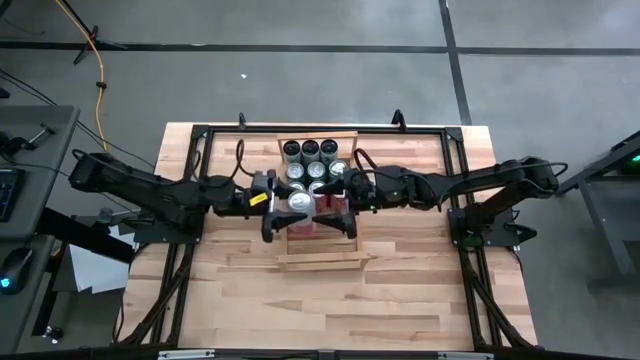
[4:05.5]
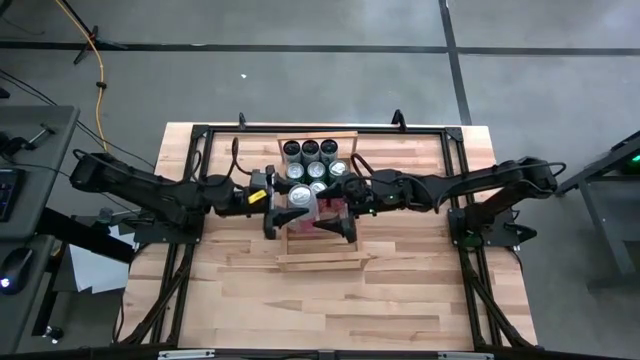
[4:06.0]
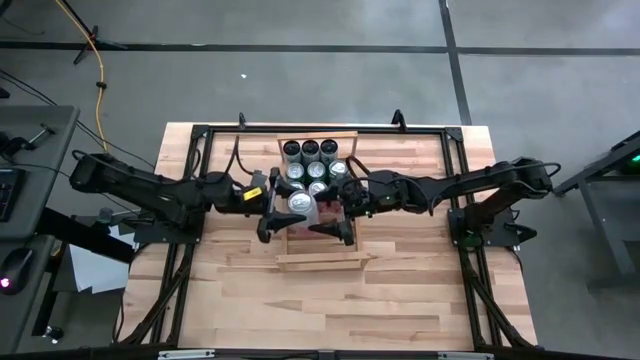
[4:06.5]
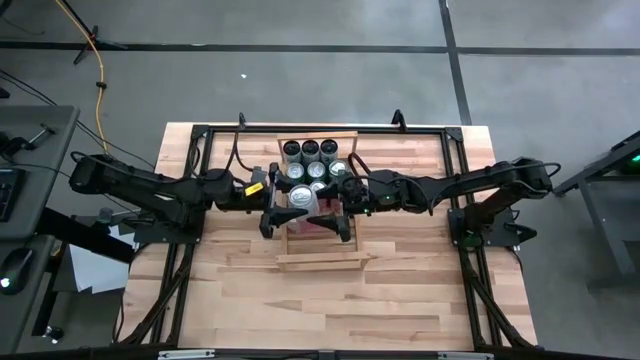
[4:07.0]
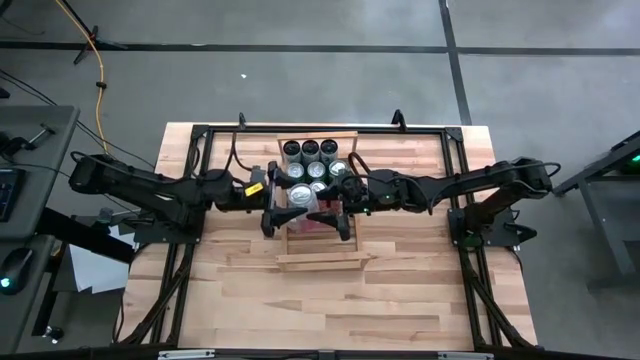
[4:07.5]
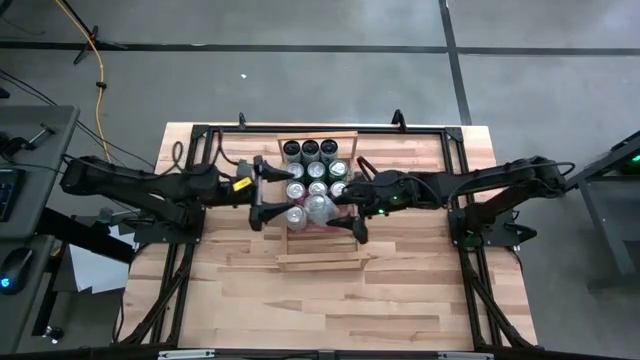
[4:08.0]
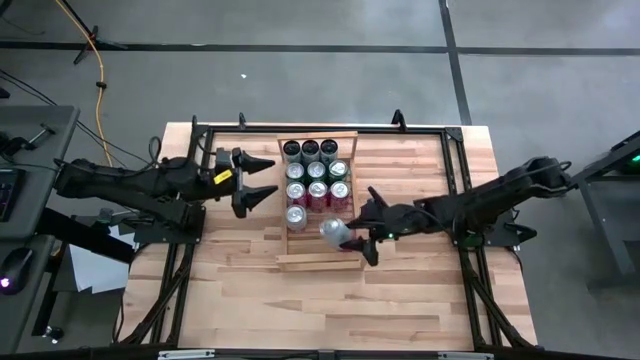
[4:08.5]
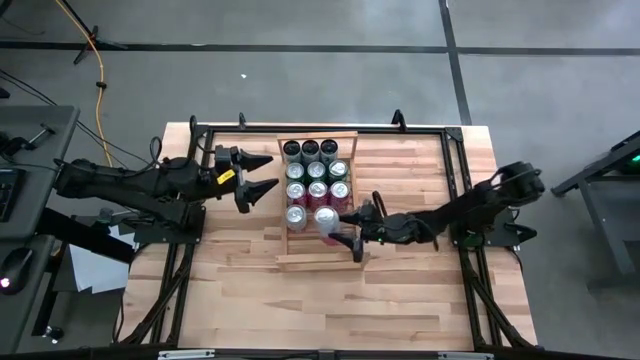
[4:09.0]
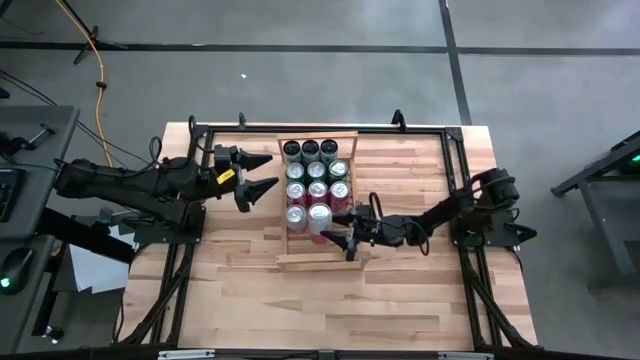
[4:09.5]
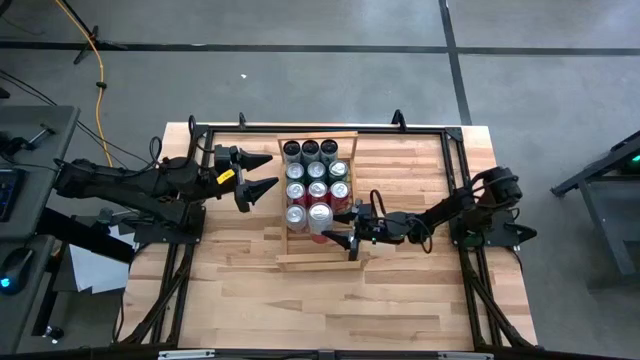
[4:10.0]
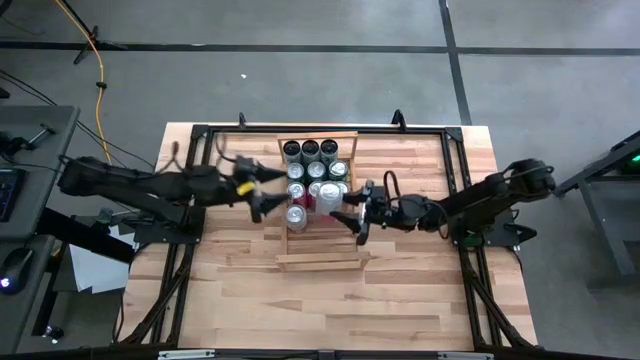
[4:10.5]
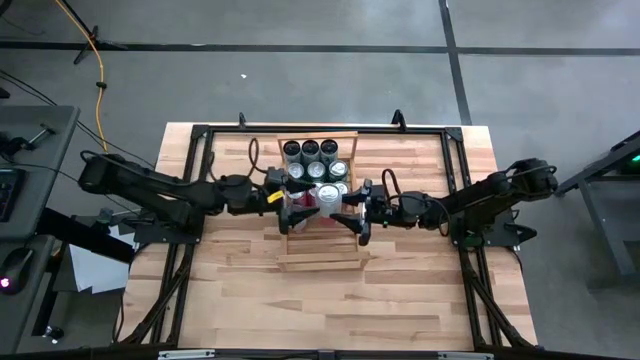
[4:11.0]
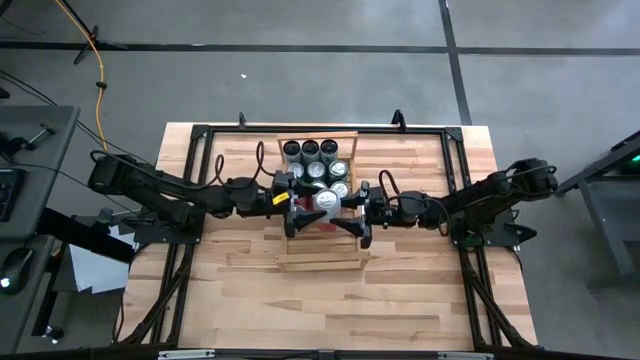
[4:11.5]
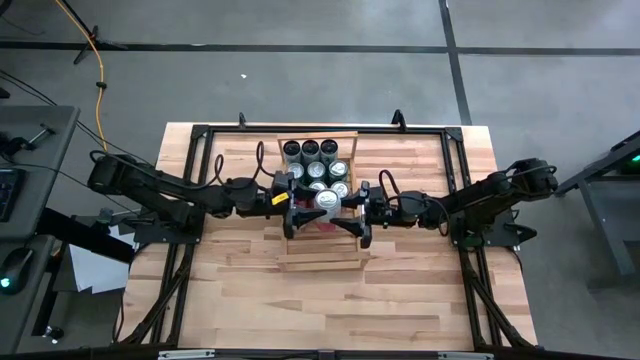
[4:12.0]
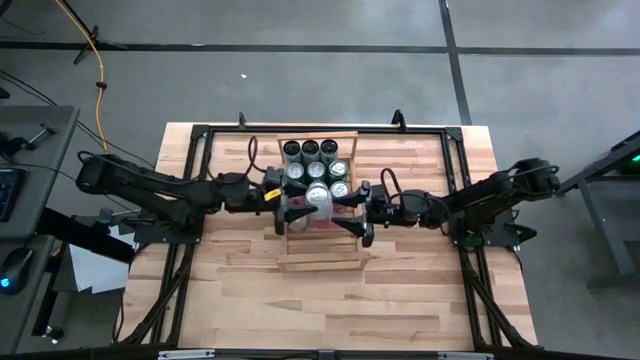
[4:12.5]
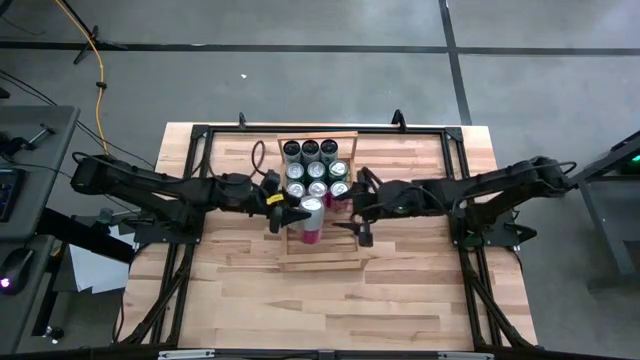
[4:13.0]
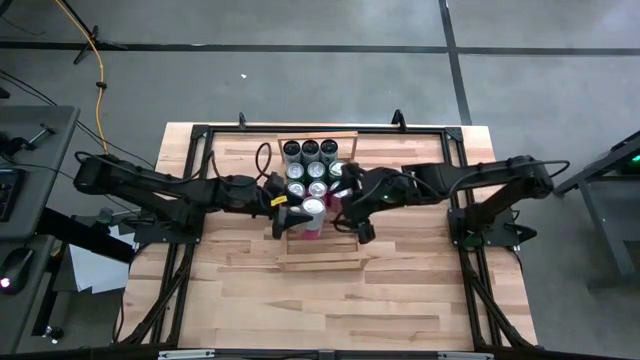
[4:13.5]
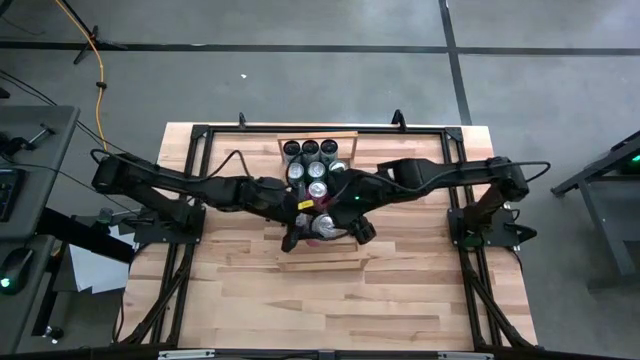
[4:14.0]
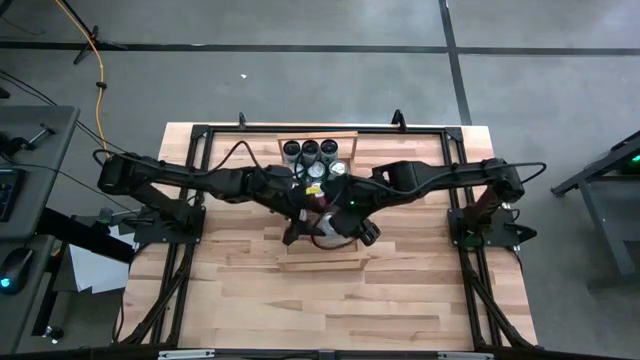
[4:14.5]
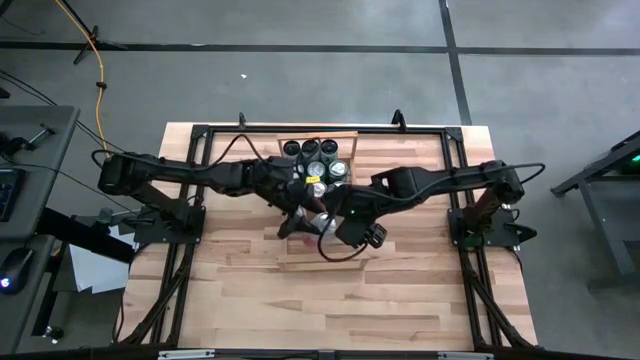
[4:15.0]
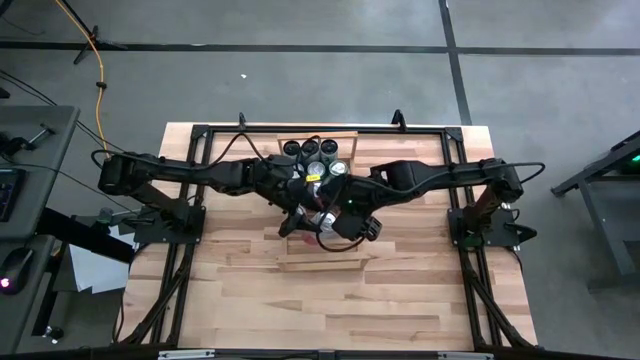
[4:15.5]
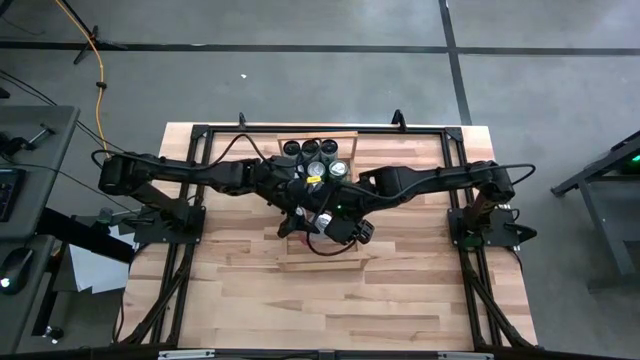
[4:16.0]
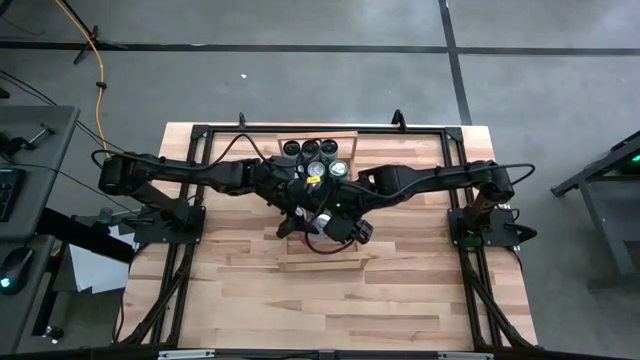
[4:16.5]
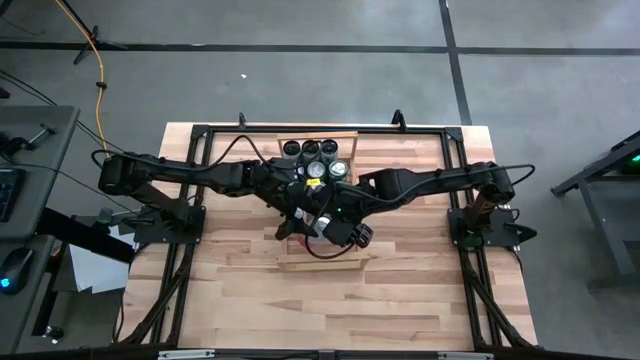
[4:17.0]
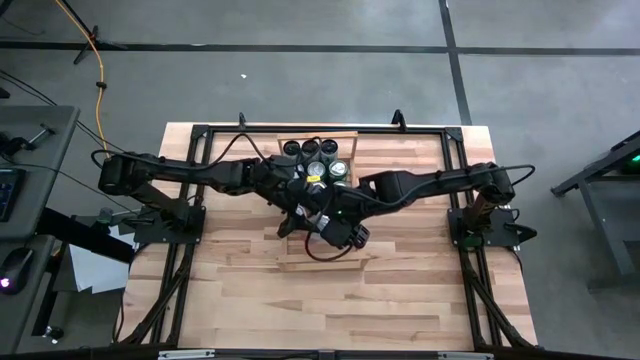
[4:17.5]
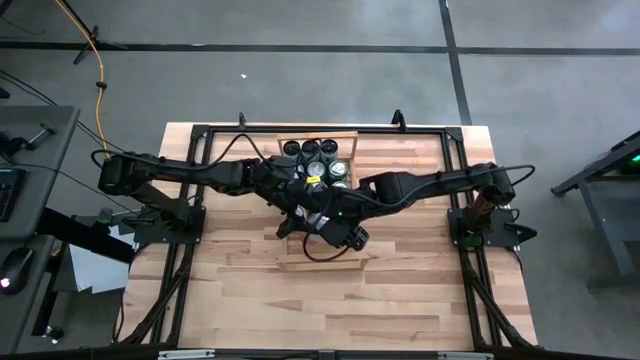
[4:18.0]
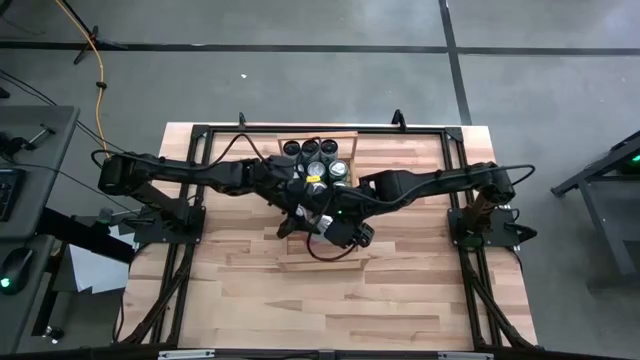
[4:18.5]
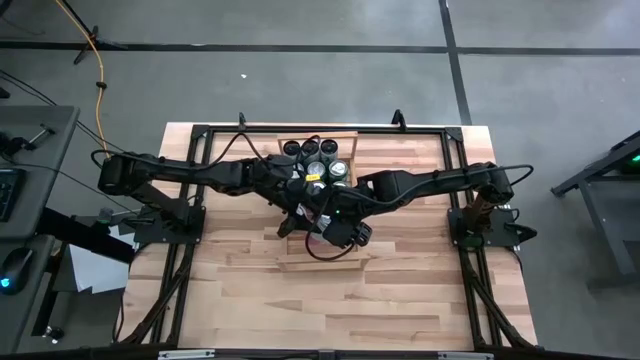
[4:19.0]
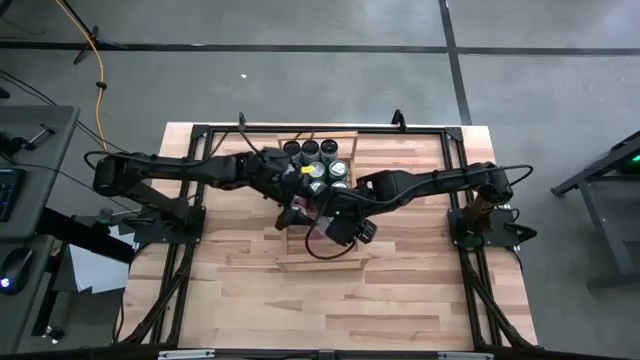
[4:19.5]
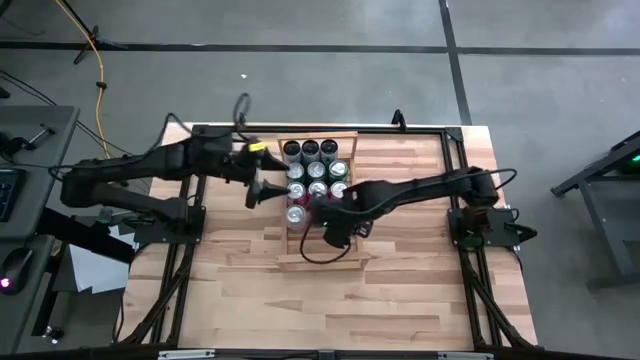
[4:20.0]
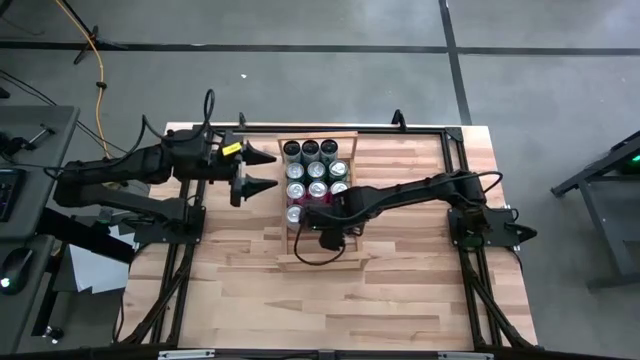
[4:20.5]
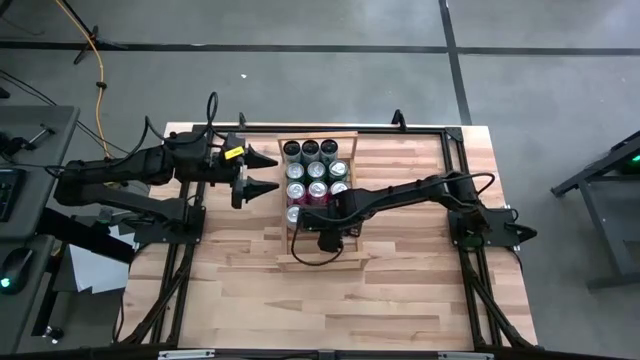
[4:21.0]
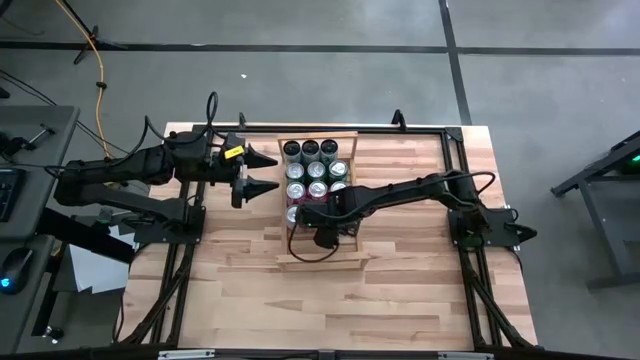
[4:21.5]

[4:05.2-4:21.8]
Task: Place canned beverage on shelf
Put the pink can on the shelf aligned with the other pink can

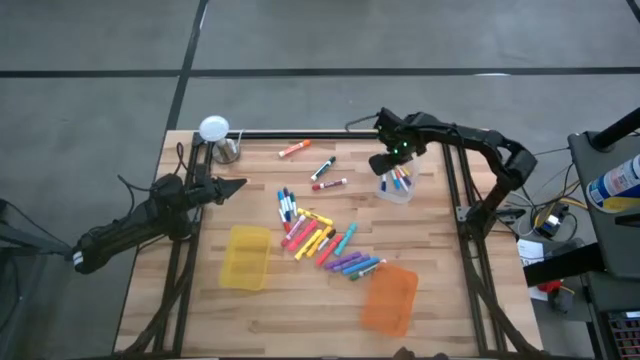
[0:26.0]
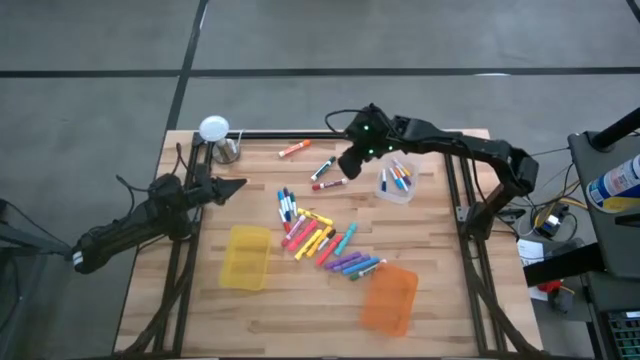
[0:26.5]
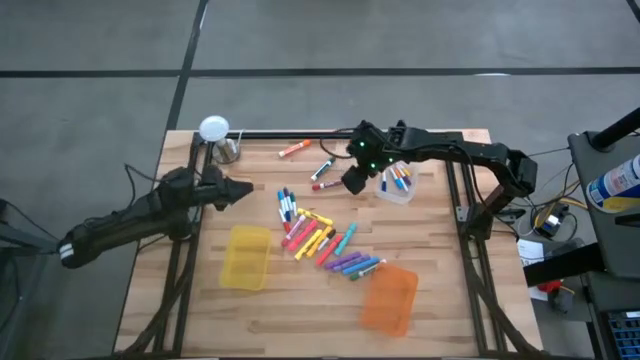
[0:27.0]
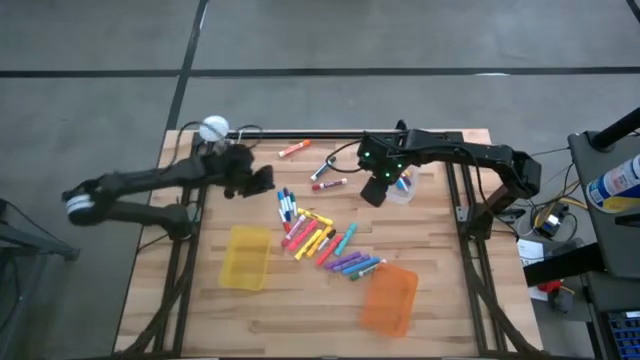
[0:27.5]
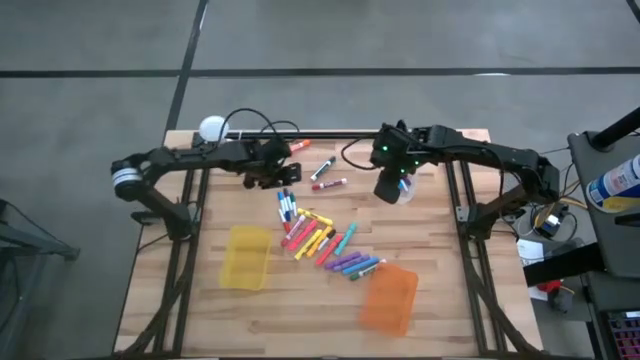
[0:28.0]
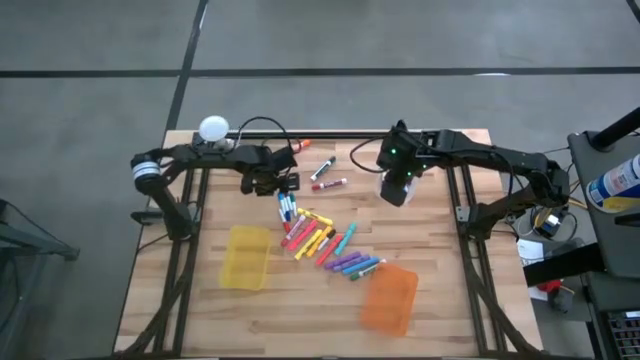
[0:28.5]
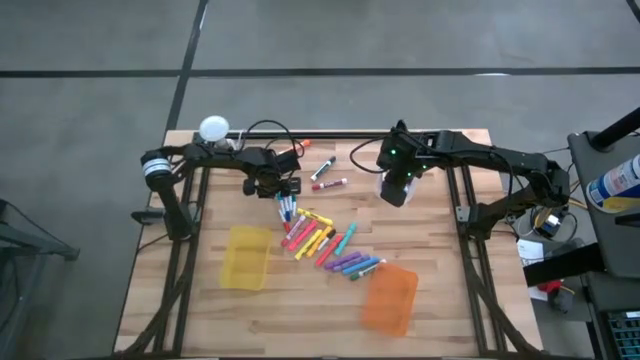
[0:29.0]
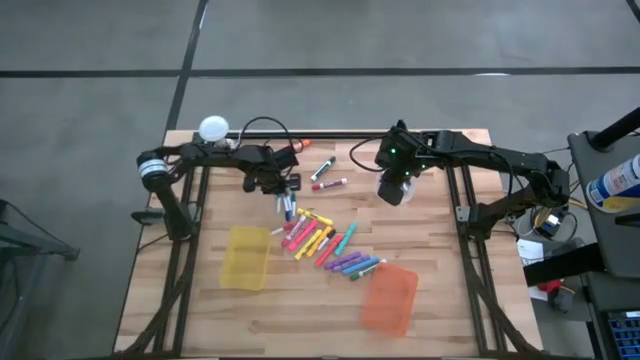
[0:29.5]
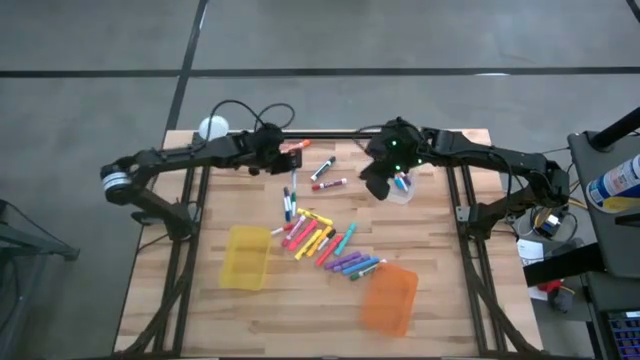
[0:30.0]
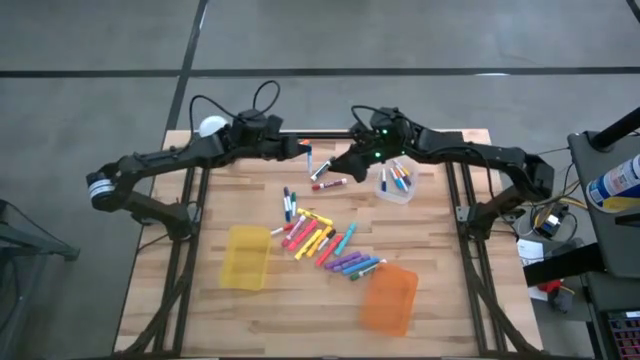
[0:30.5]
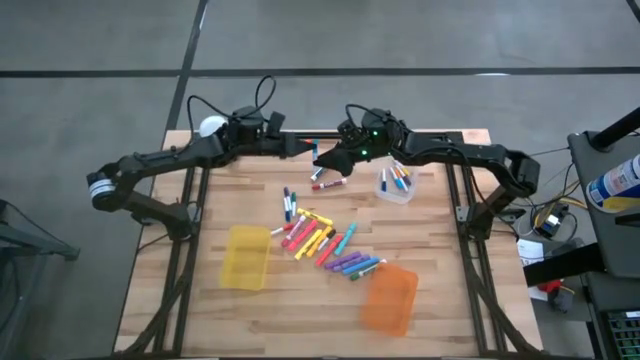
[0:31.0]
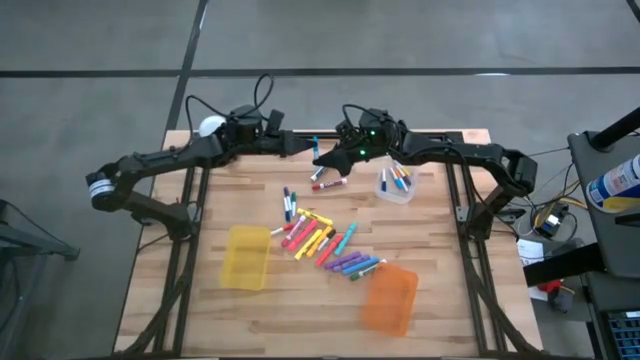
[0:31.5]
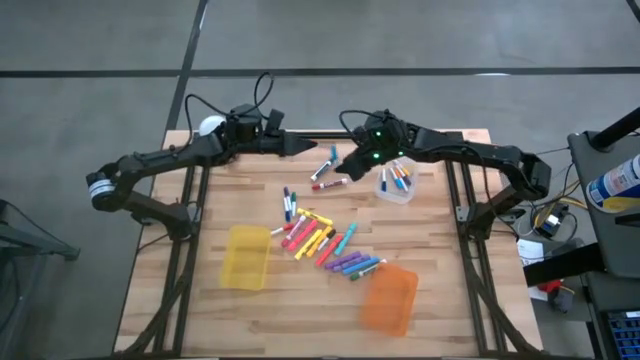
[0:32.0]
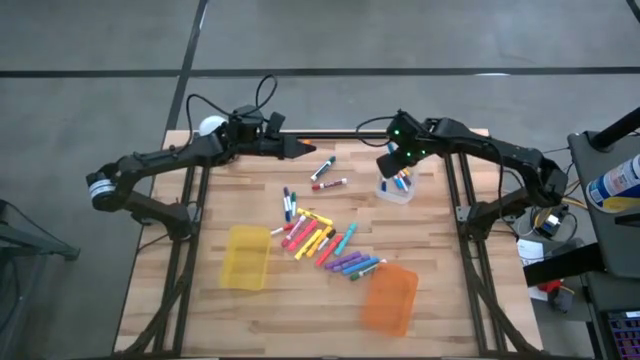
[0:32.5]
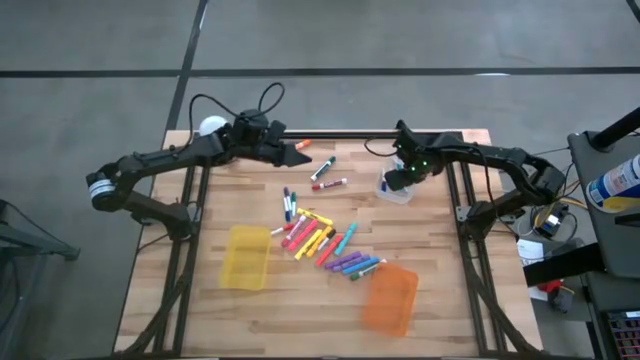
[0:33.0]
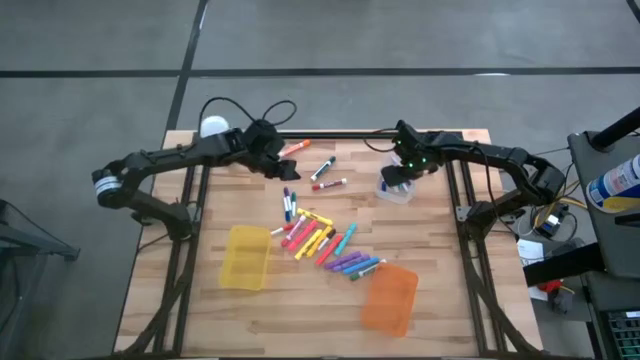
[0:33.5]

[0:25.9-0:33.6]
Task: Pick & Place Markers
Put the small light blue highlighter pen into the transparent bin
